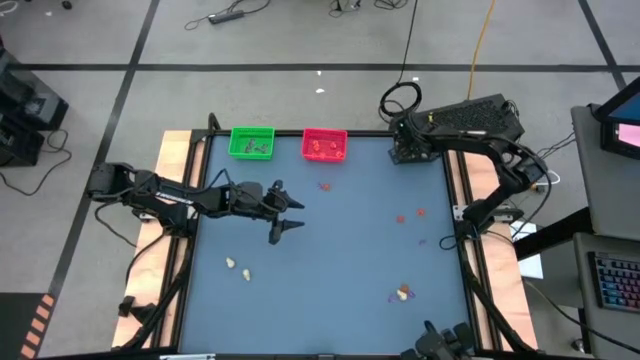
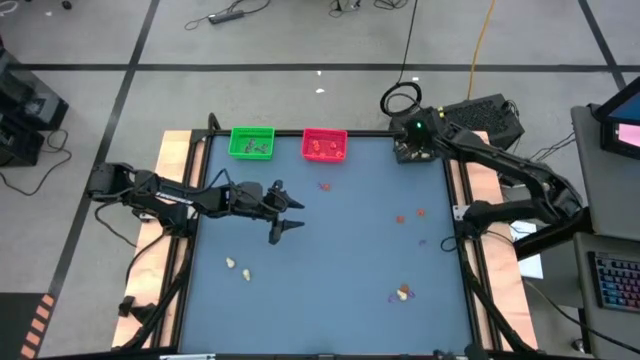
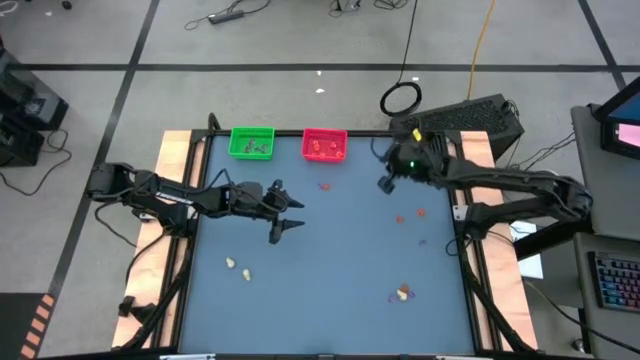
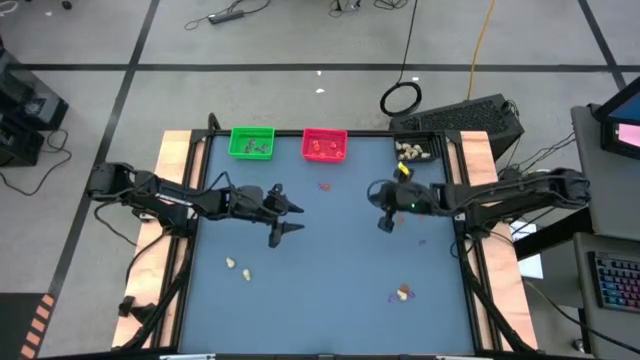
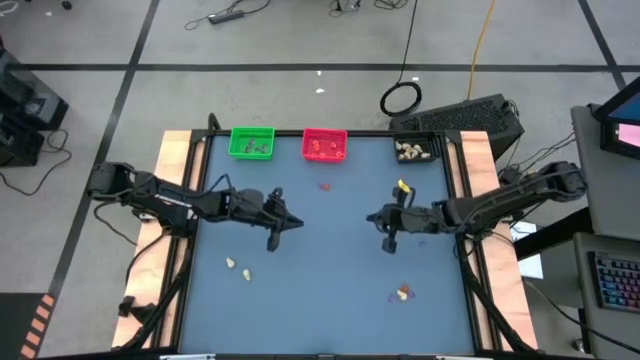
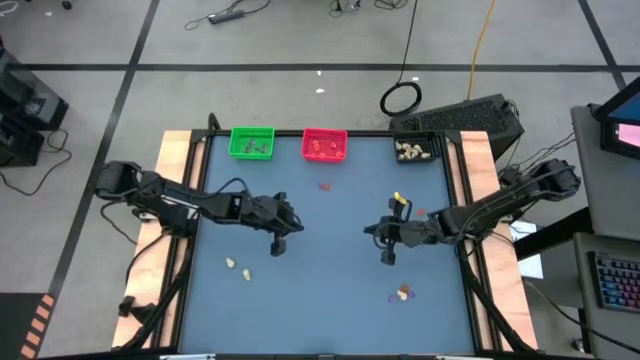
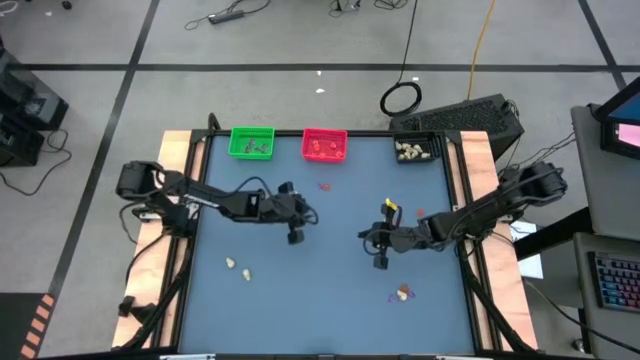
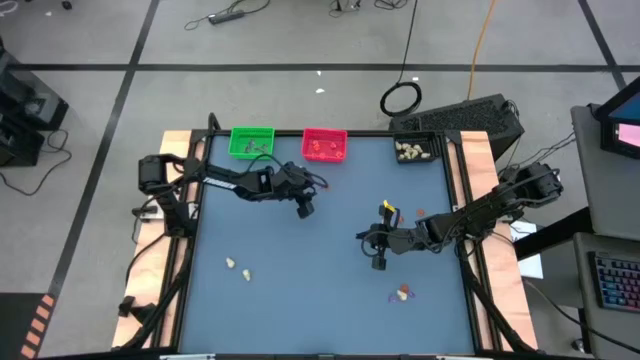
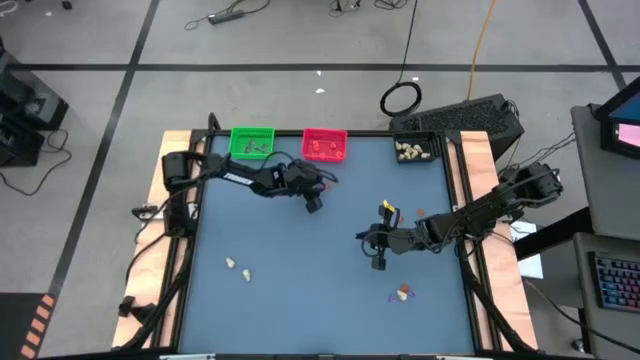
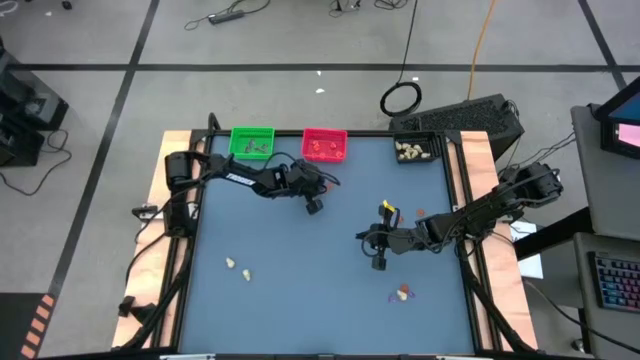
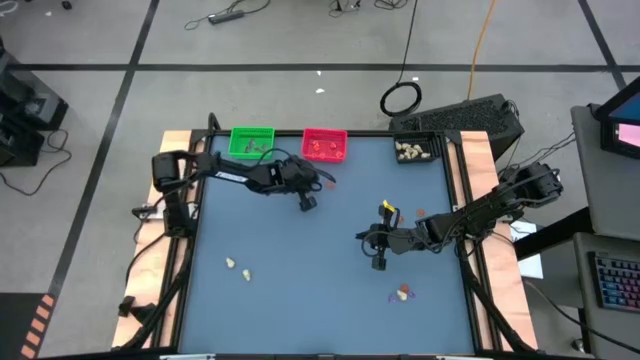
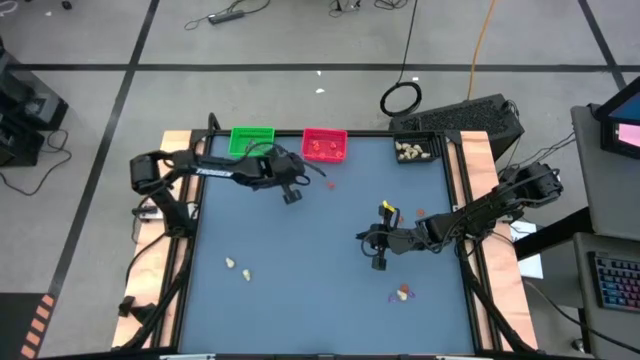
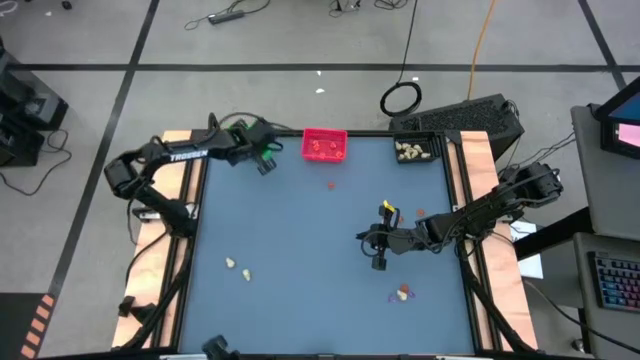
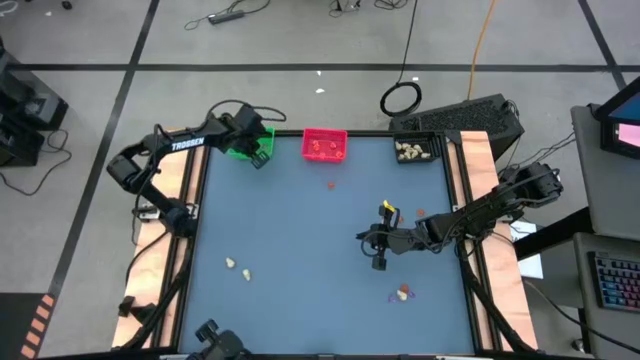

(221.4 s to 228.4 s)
Task: Sort Halloween decoration
Put the purple witch hat toy into the green bin

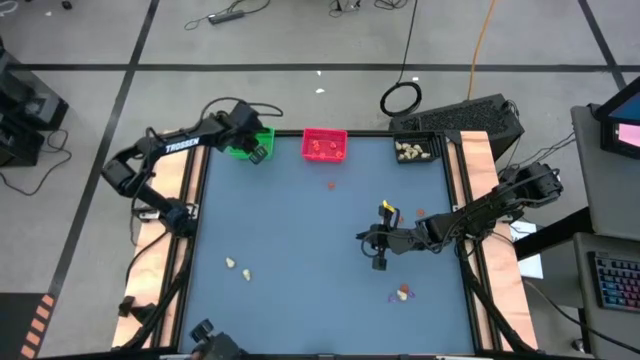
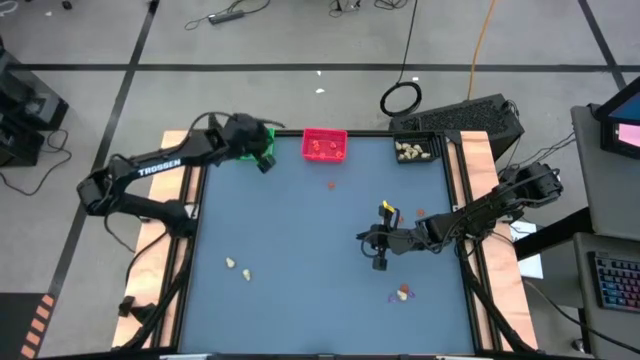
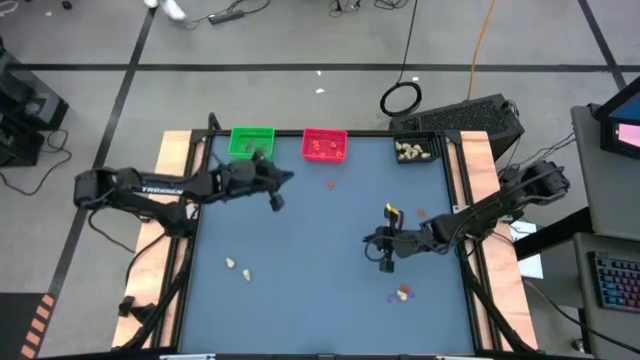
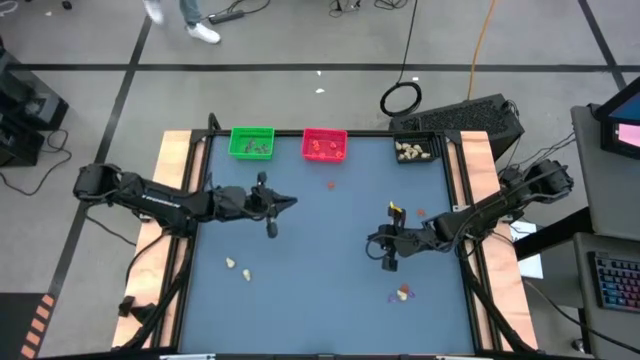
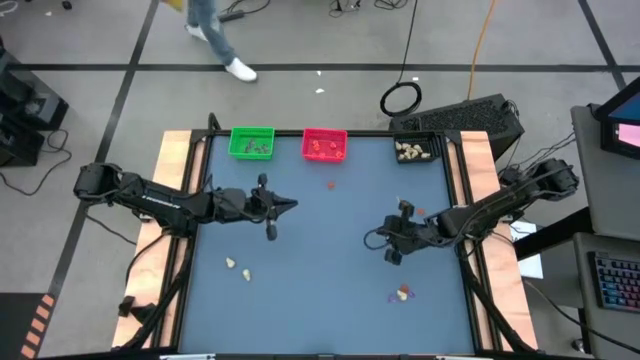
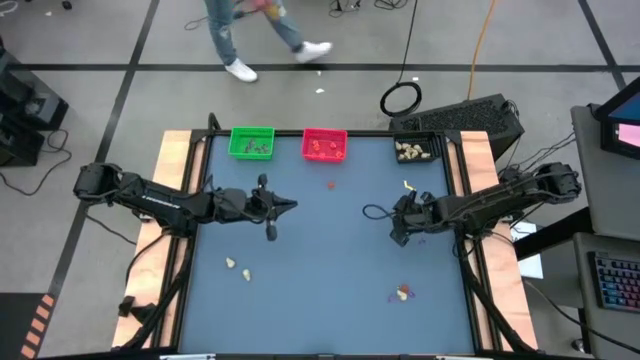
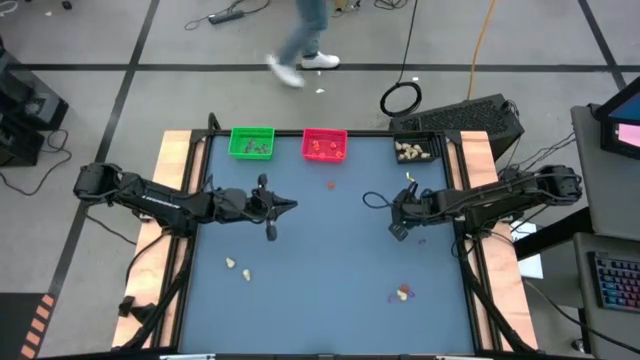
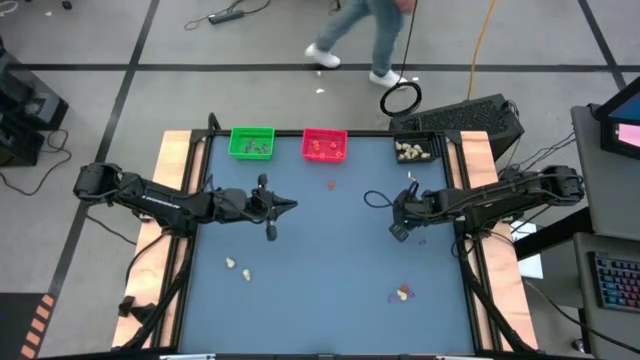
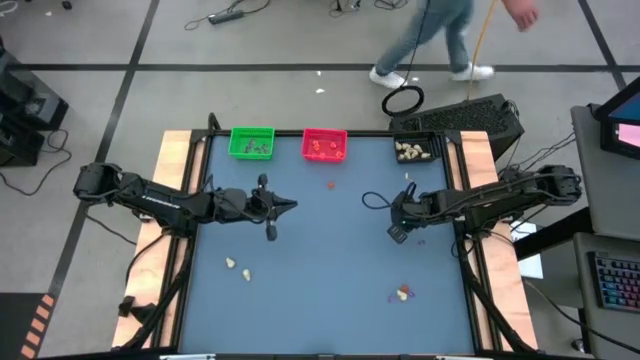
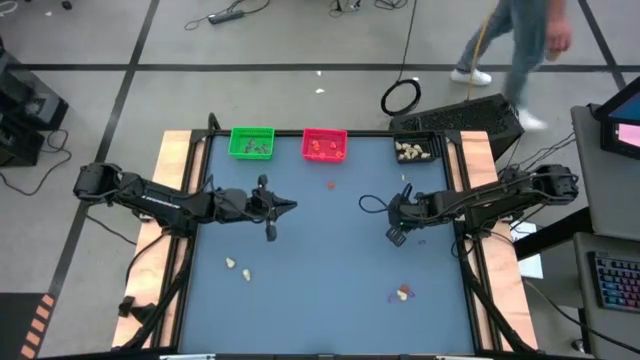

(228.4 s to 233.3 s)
Put the orange pumpkin toy into the red bin

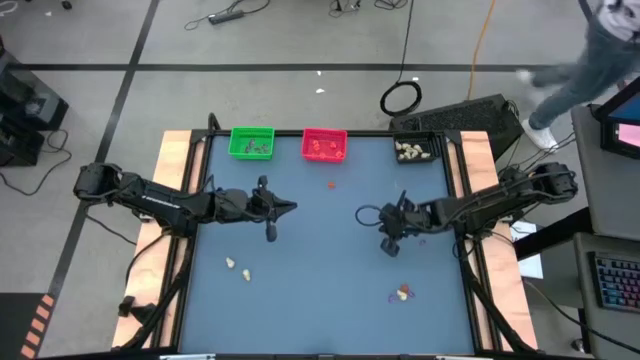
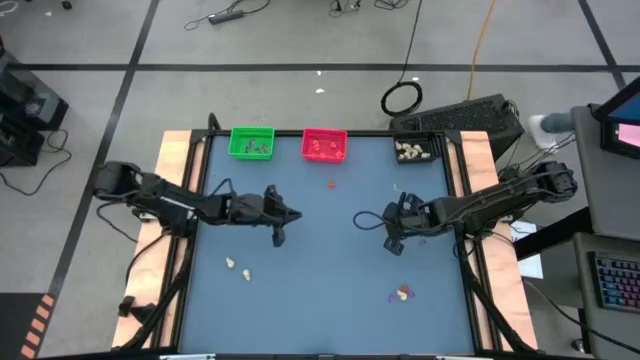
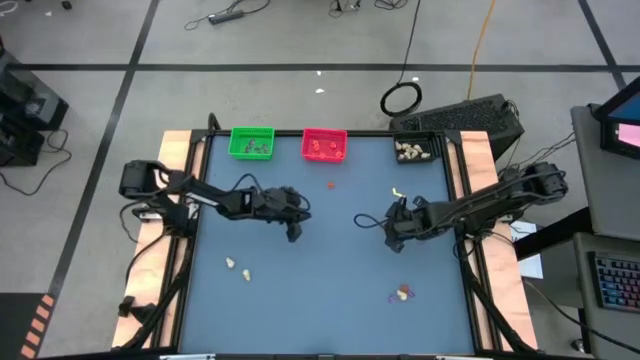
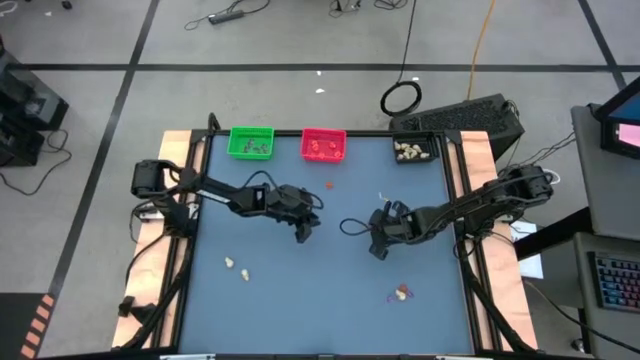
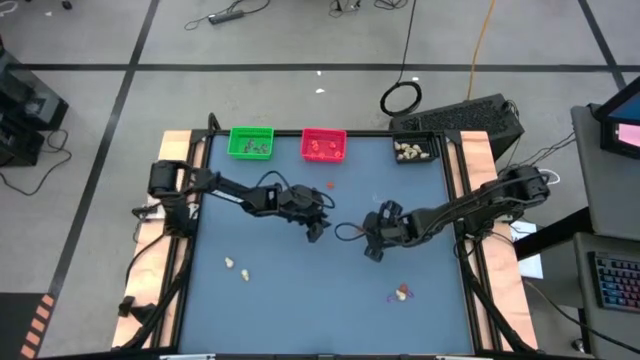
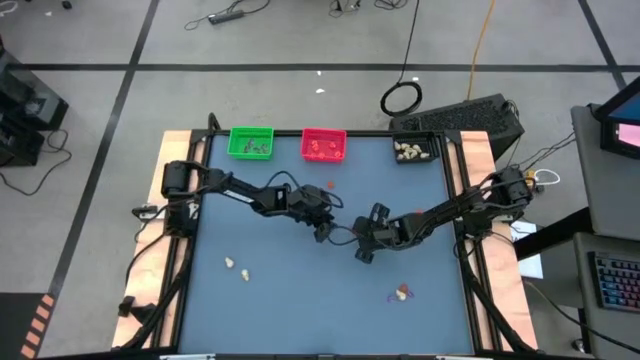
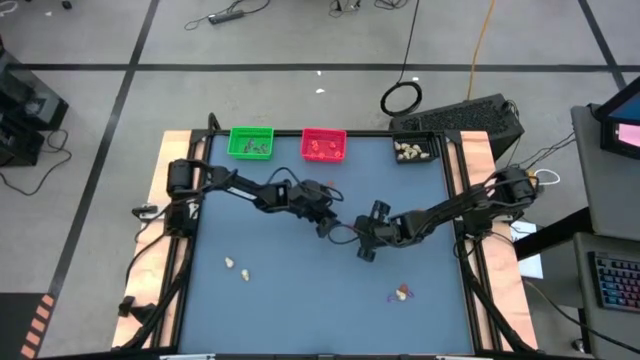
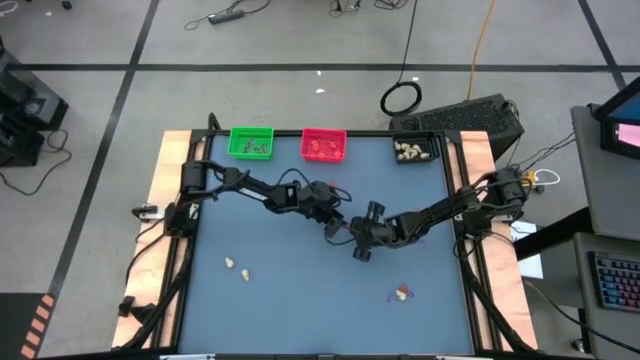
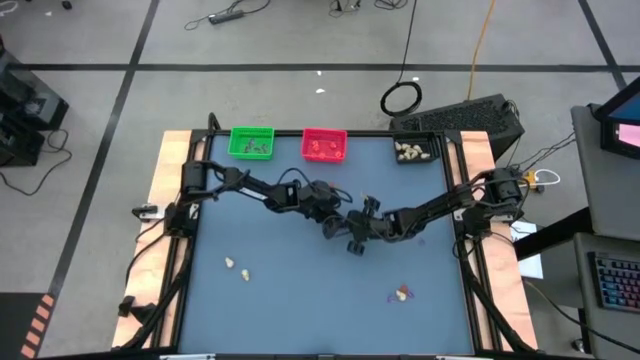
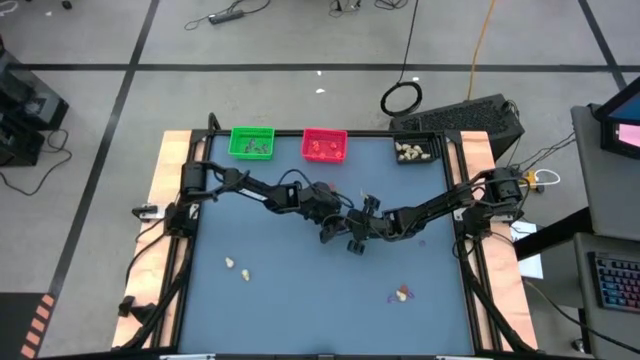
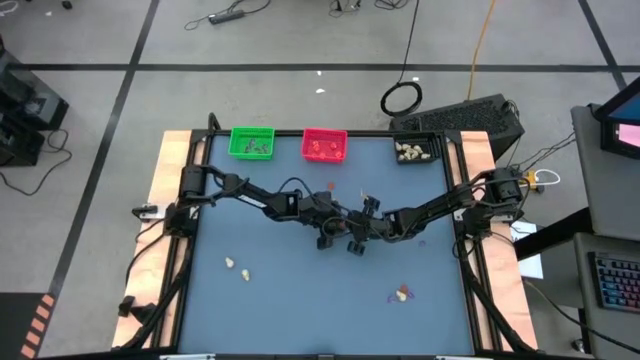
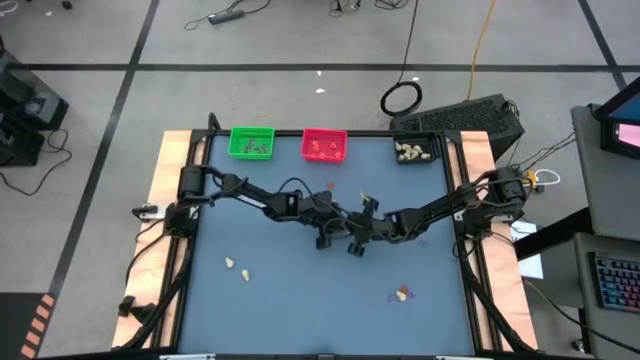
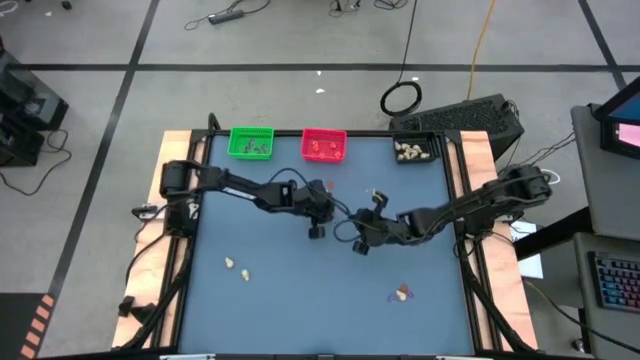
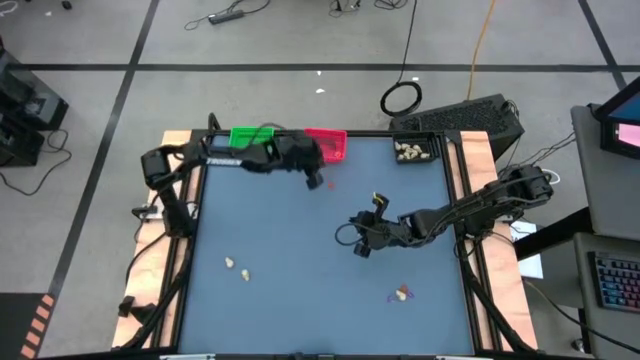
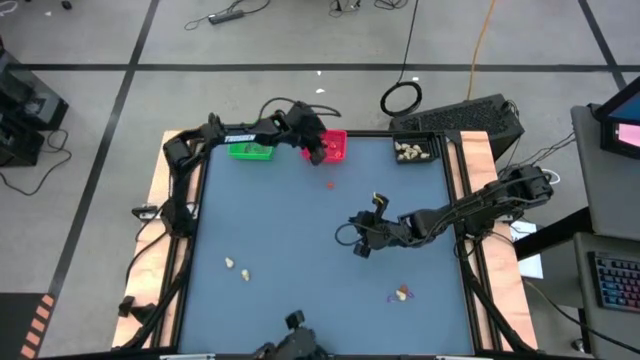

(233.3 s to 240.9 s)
Put the orange pumpkin toy into the red bin

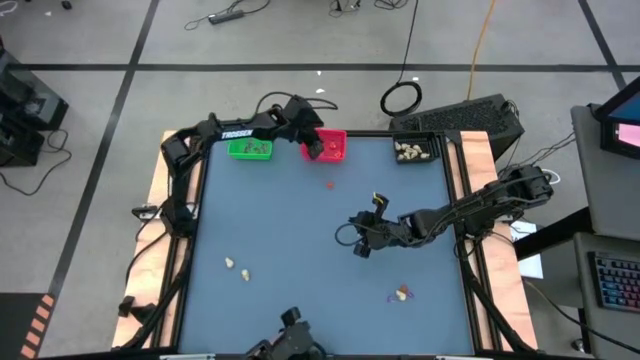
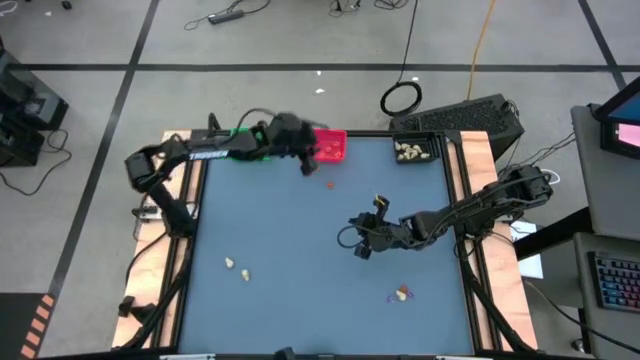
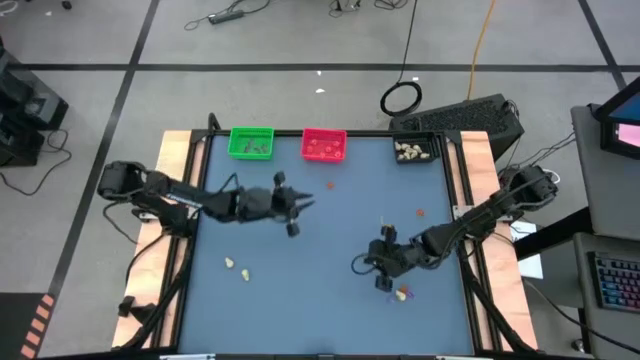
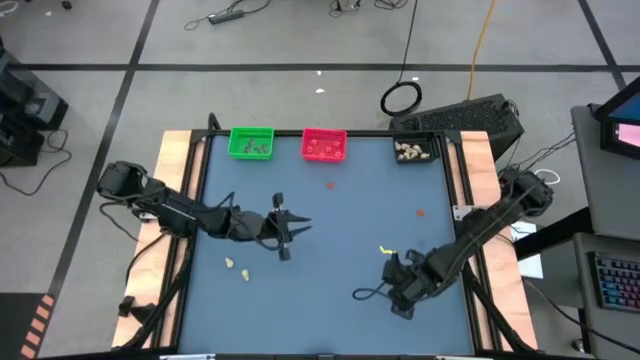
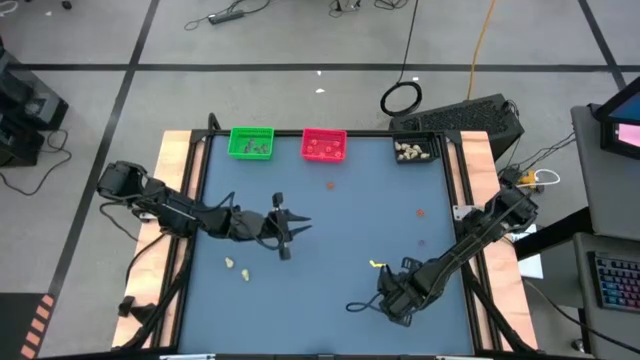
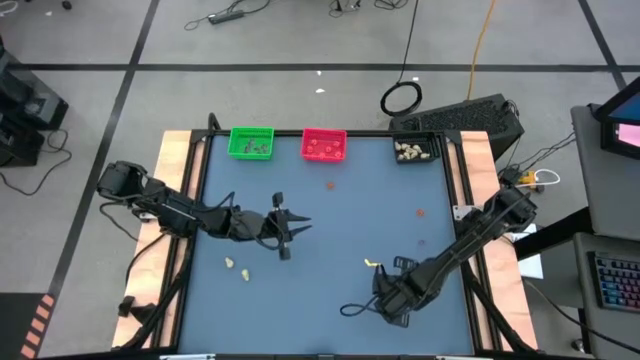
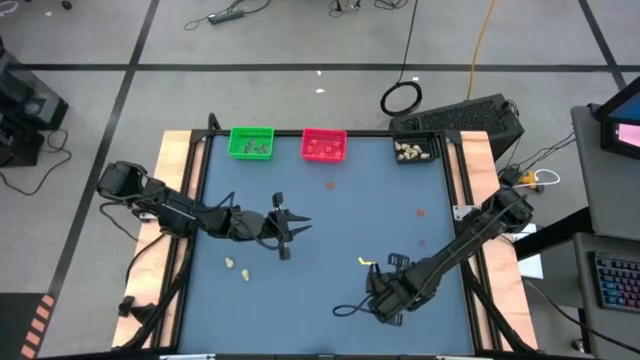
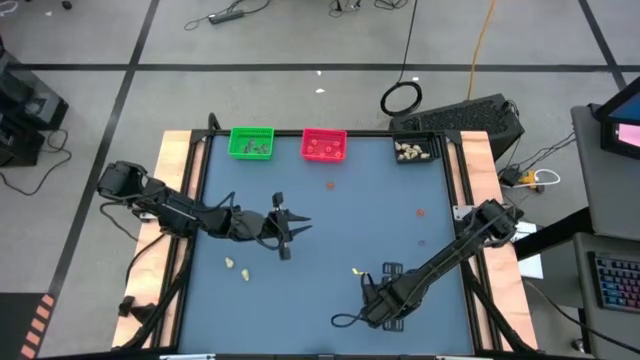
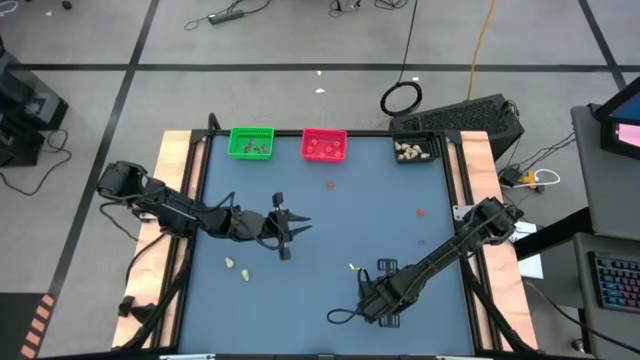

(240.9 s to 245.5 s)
Put the white skull toy into the black bin
